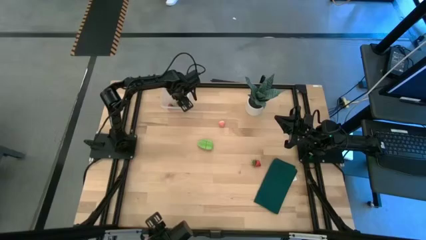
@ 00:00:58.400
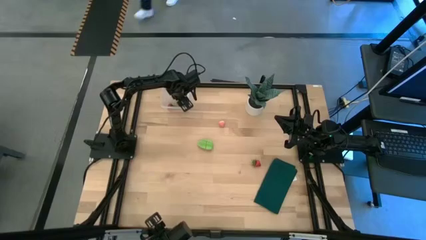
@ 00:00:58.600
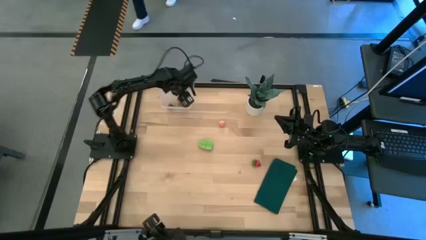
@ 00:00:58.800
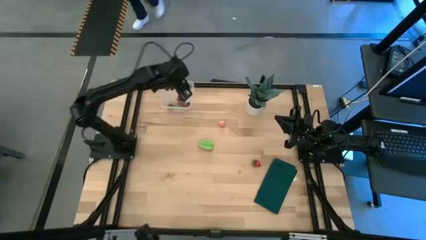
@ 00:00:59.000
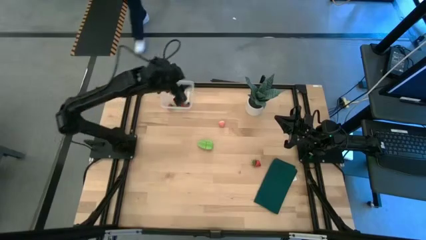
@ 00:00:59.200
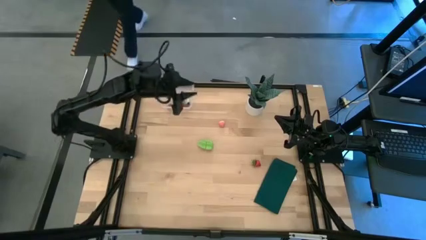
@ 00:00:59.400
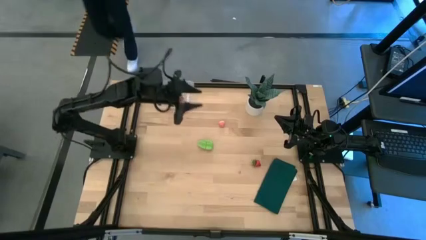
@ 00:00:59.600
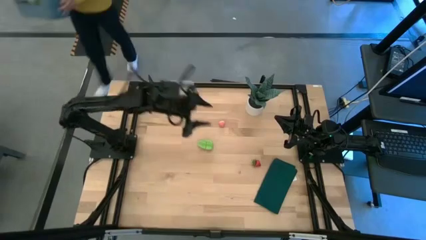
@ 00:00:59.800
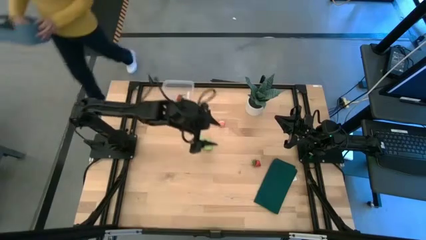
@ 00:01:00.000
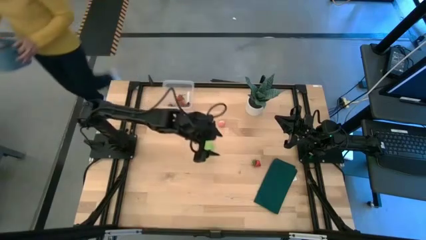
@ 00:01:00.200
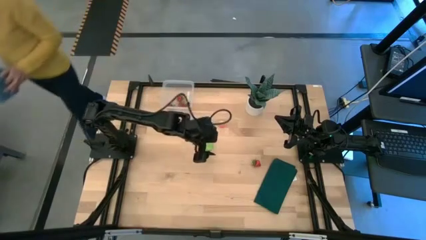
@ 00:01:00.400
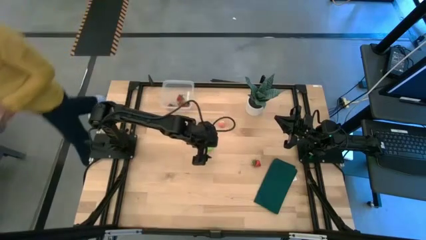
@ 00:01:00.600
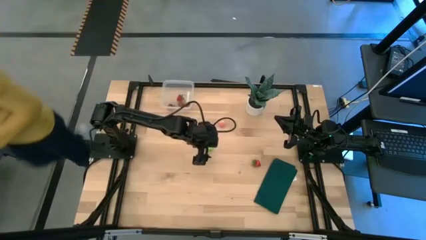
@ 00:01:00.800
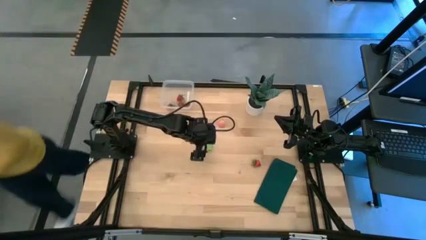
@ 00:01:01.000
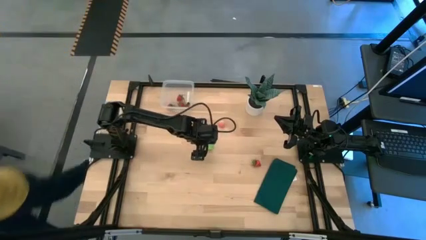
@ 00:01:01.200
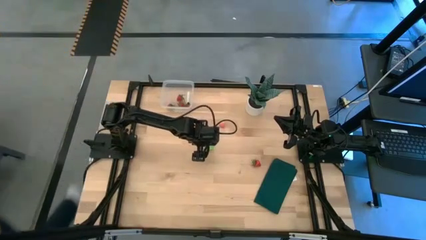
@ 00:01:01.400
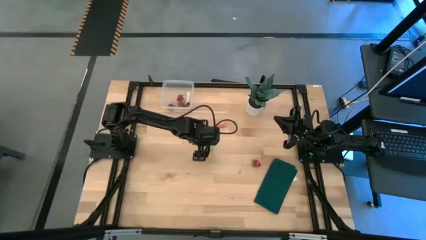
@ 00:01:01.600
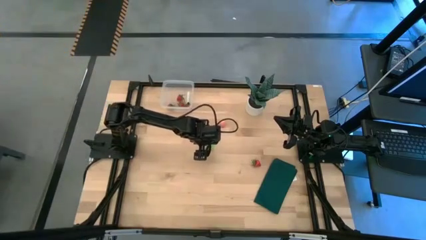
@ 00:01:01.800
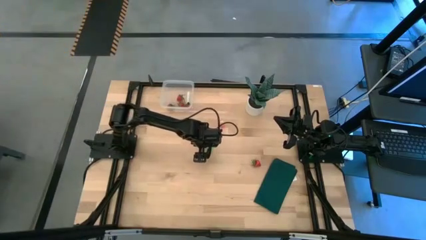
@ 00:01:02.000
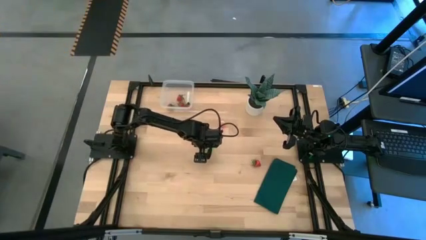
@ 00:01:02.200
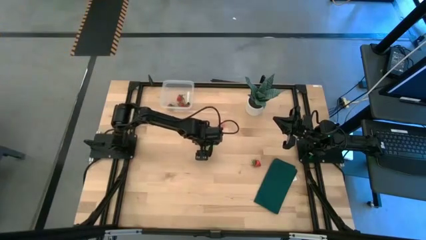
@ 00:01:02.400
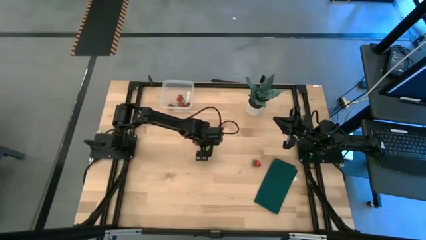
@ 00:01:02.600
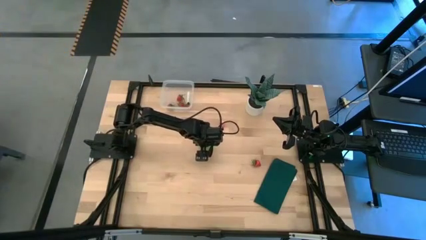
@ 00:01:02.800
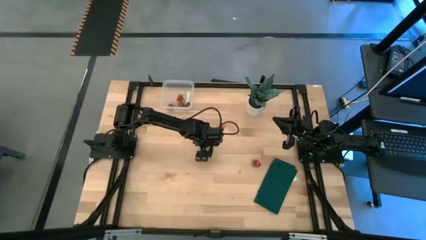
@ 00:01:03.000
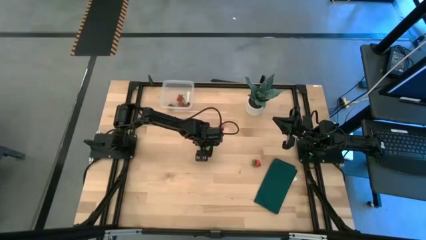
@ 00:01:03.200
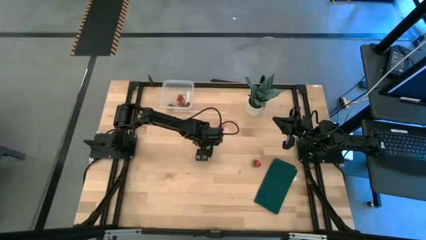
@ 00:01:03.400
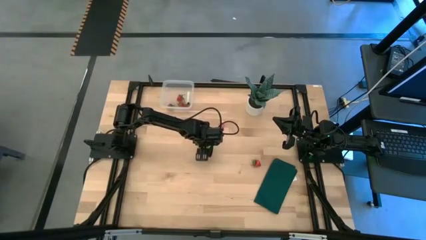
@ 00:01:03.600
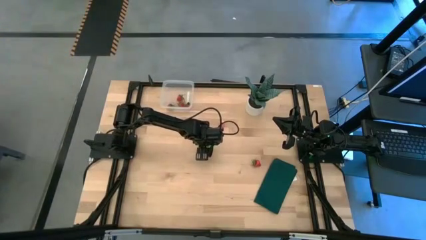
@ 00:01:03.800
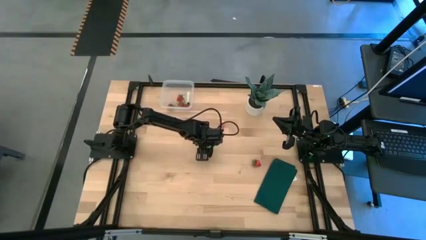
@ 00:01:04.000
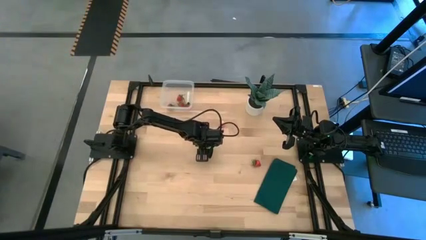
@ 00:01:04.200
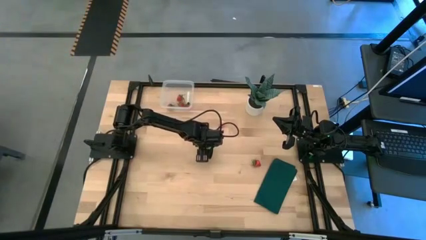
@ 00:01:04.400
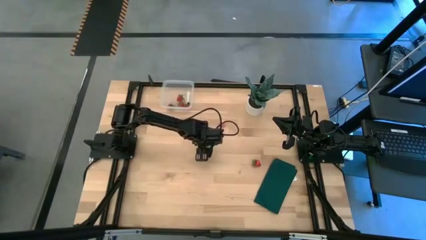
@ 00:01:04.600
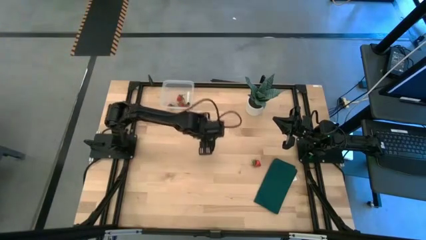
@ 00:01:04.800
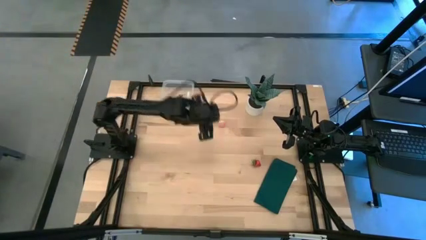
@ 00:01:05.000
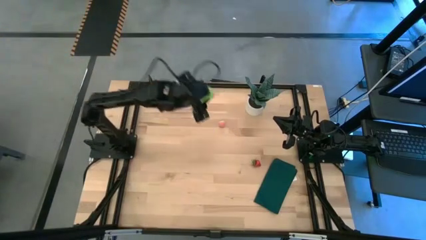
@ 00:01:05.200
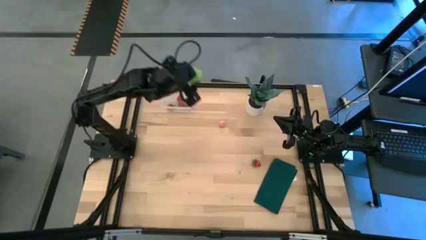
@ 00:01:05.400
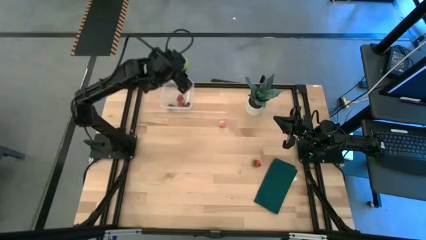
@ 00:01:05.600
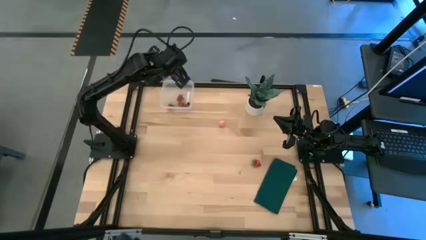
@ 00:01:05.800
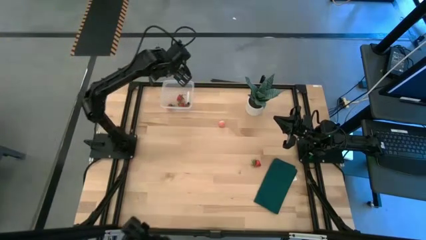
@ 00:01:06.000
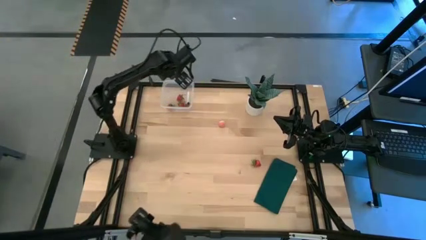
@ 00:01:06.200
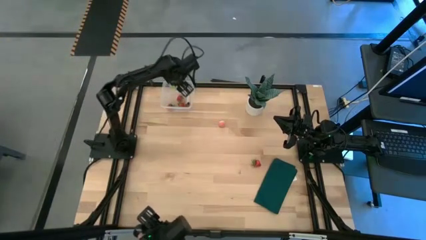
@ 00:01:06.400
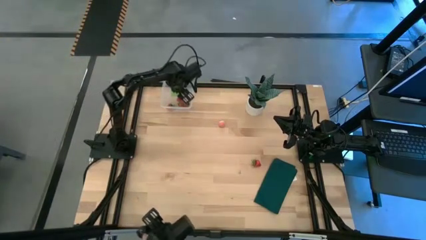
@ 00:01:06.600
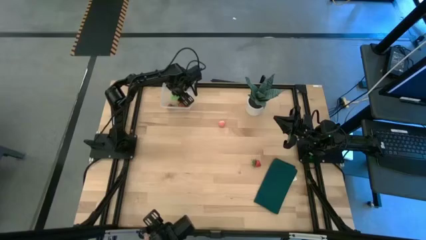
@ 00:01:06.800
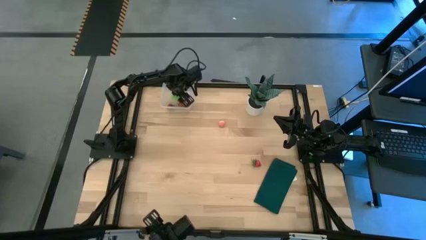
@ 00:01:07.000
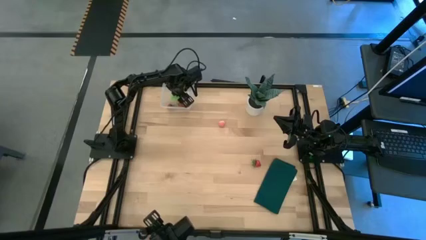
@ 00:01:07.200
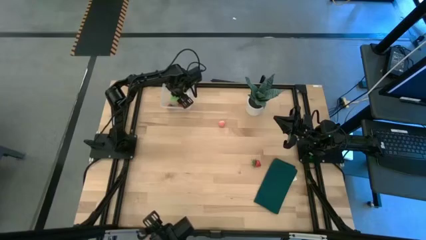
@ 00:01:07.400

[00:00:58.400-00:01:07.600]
Task: Pick and placing Produce into tupperware
Put the light green star fruit into the transparent container

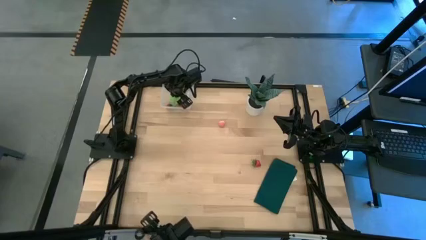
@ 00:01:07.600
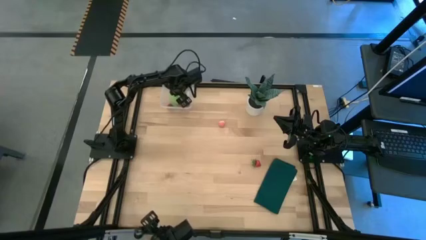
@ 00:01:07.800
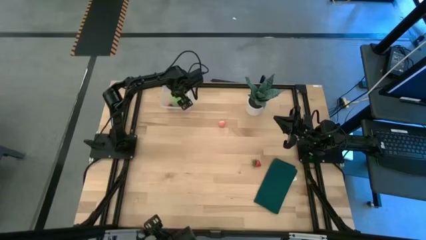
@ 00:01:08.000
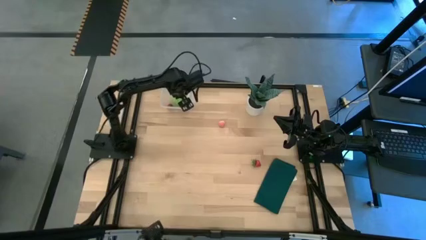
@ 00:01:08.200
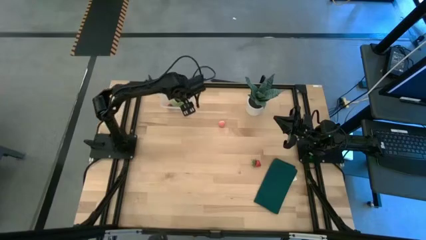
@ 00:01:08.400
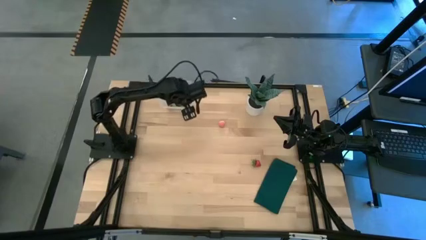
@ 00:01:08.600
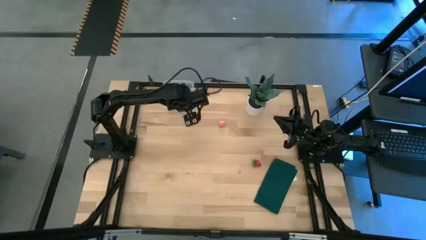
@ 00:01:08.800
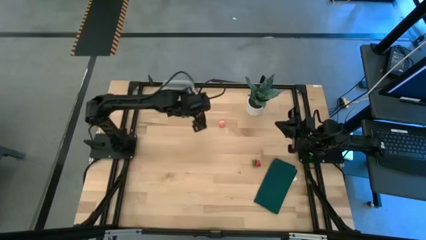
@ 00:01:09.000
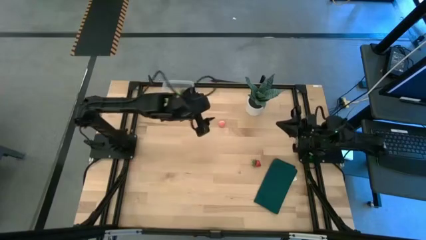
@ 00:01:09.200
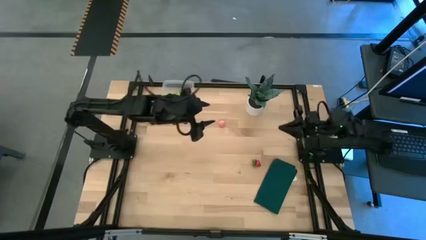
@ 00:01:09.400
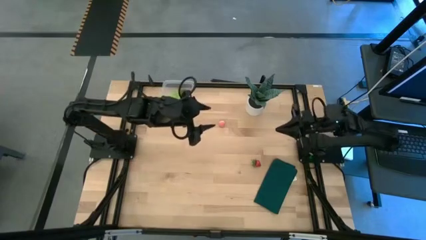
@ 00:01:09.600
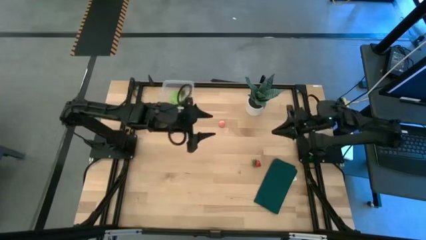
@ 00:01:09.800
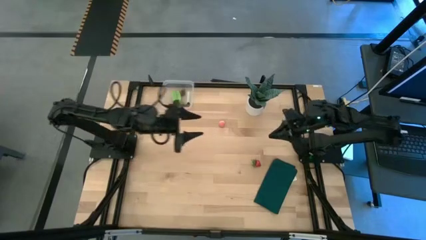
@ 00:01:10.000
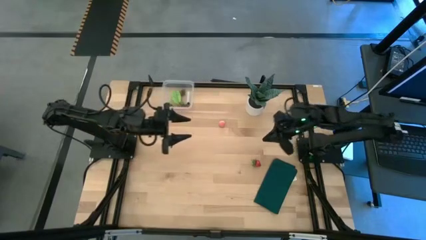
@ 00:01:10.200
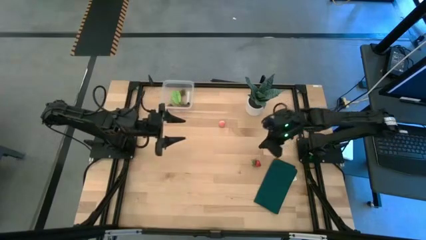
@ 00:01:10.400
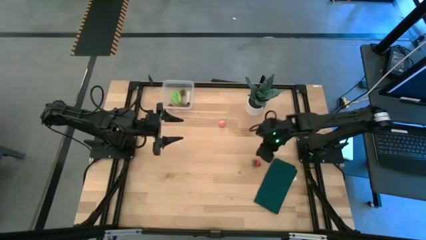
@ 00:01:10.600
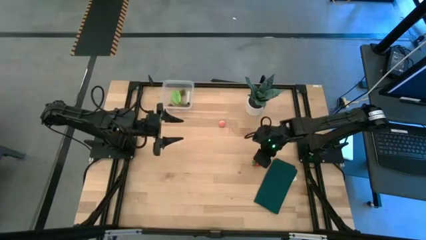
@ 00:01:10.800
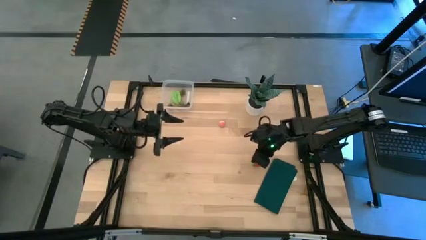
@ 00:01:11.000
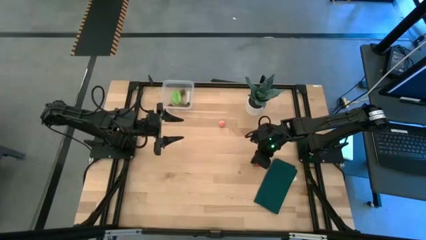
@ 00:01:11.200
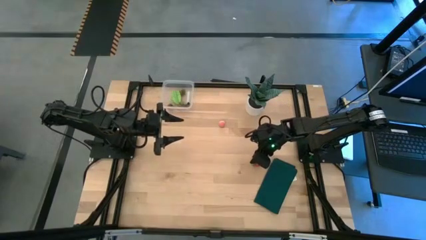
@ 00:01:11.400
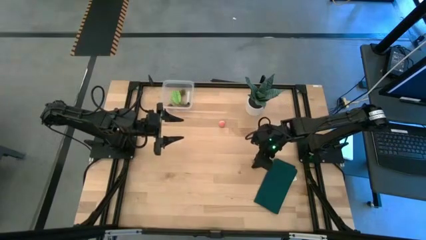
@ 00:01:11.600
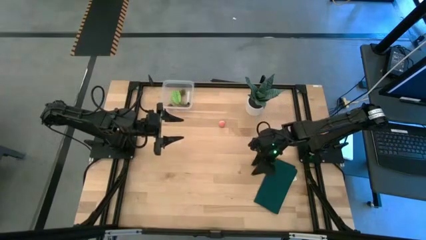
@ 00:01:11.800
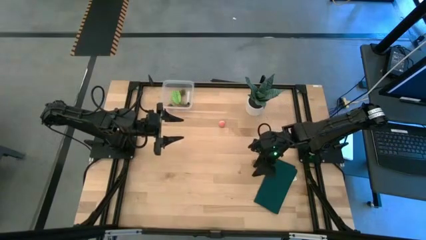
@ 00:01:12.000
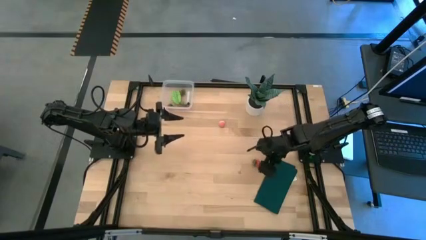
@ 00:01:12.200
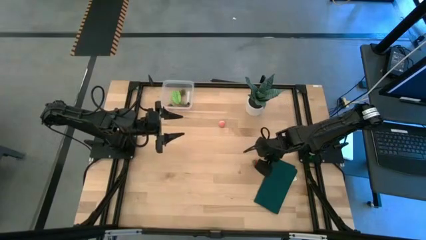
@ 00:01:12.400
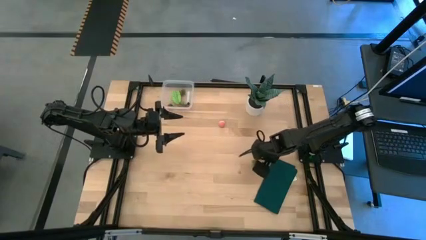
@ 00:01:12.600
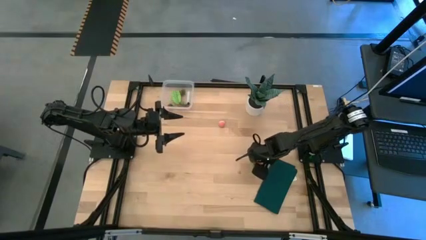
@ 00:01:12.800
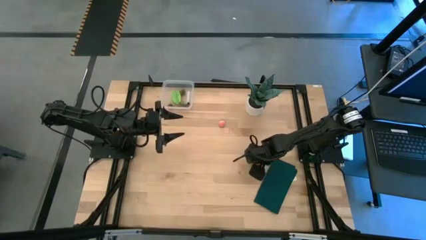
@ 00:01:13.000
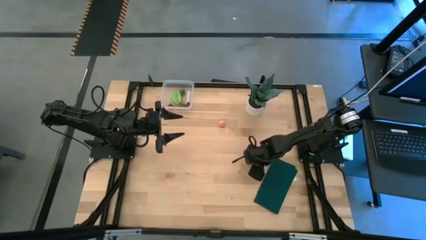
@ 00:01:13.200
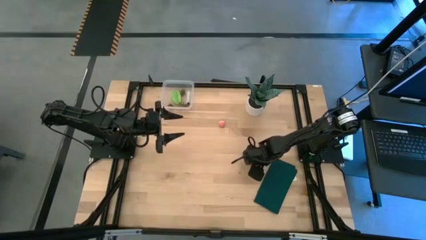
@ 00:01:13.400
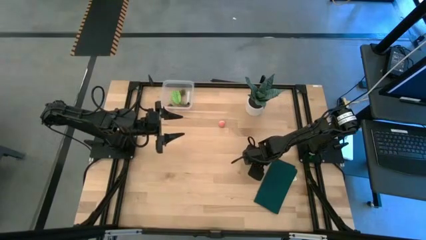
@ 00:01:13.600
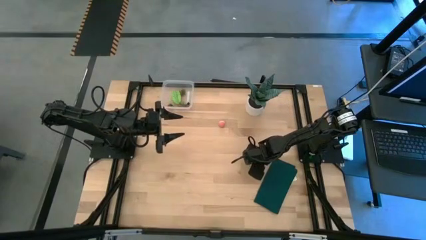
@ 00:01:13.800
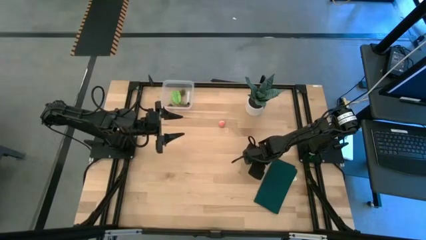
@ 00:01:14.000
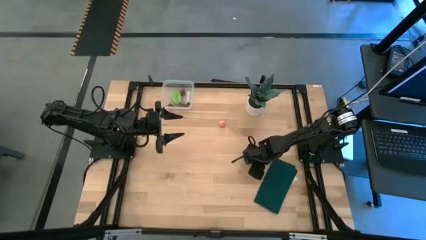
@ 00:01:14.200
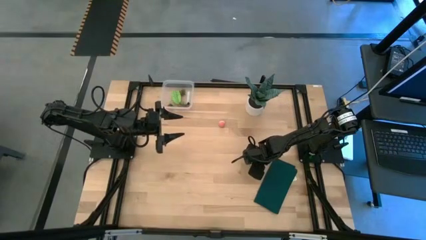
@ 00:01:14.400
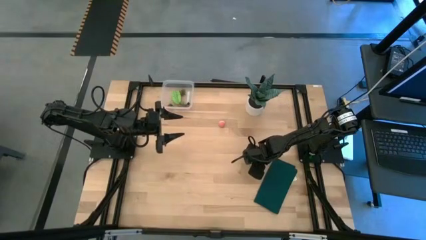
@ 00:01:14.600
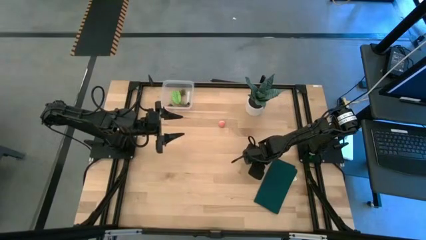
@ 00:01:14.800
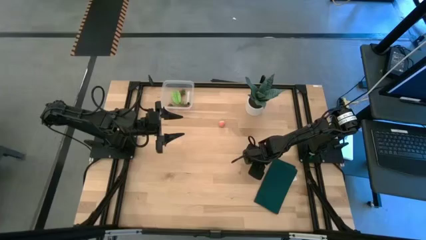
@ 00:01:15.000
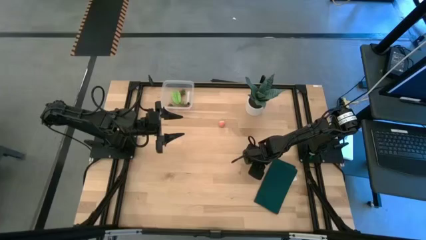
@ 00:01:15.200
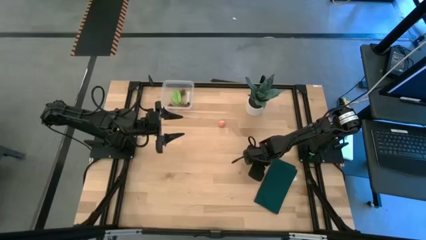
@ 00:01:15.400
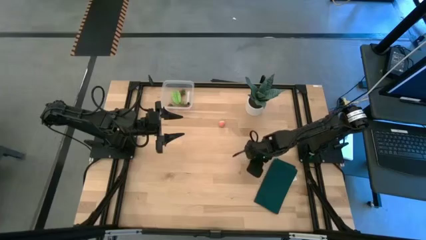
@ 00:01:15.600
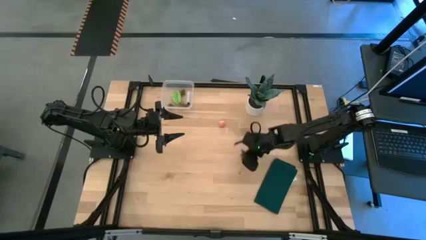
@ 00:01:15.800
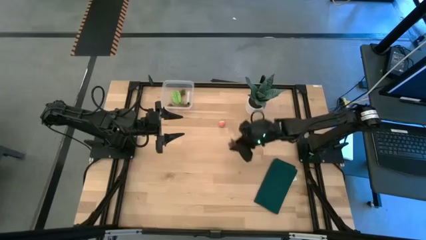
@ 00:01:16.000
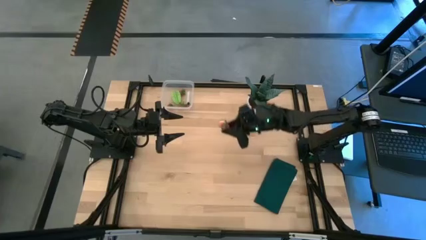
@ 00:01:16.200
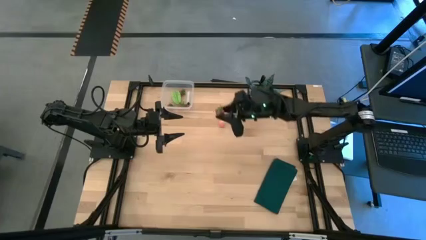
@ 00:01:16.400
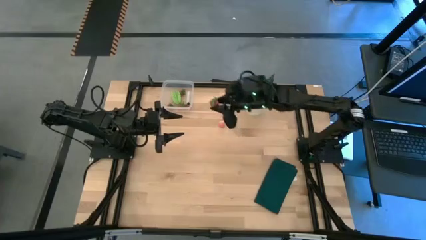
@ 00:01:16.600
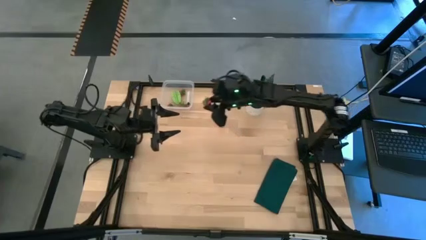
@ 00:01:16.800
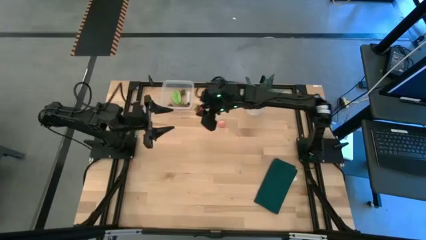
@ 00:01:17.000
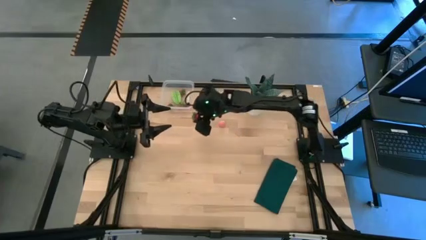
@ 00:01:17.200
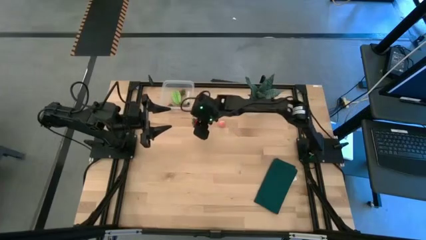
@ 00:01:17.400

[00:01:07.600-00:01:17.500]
Put the red strawberry into the transparent container
